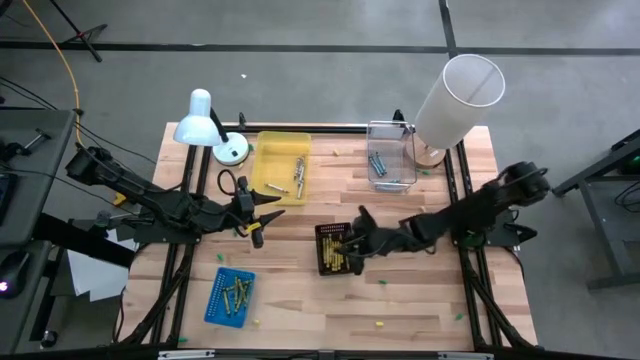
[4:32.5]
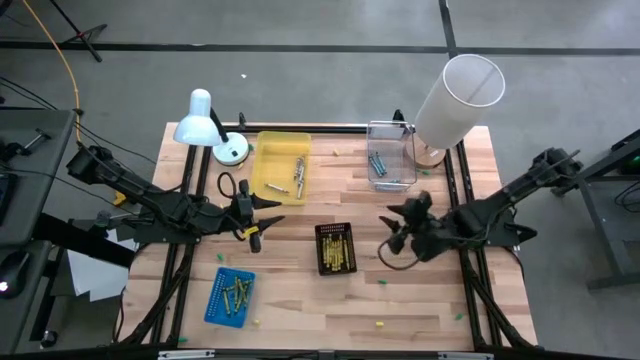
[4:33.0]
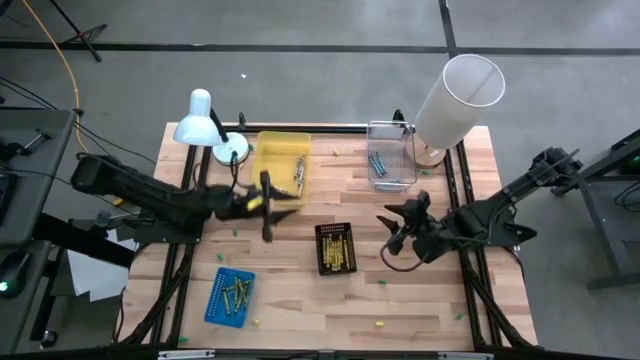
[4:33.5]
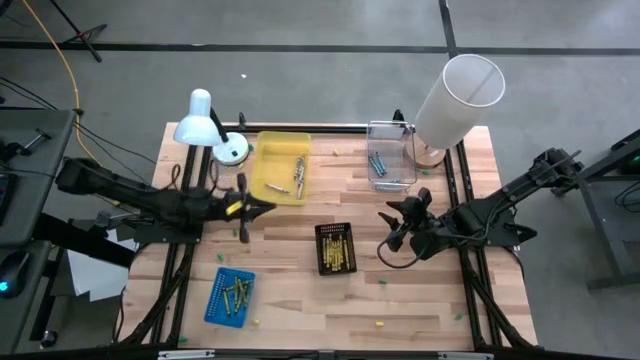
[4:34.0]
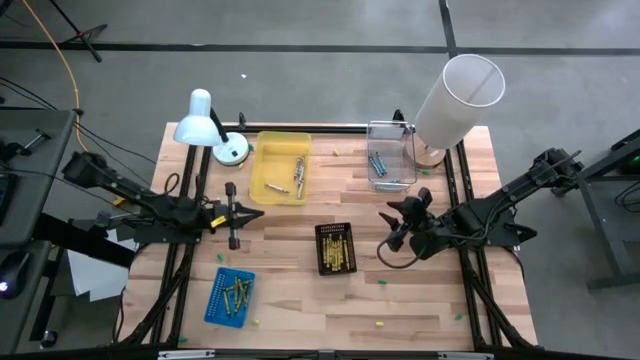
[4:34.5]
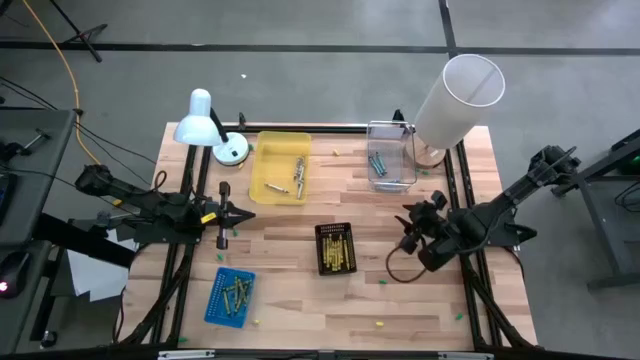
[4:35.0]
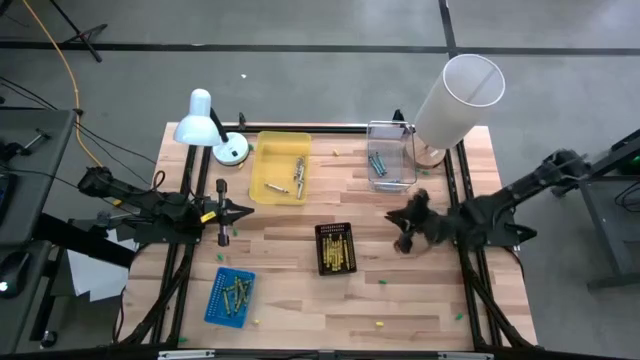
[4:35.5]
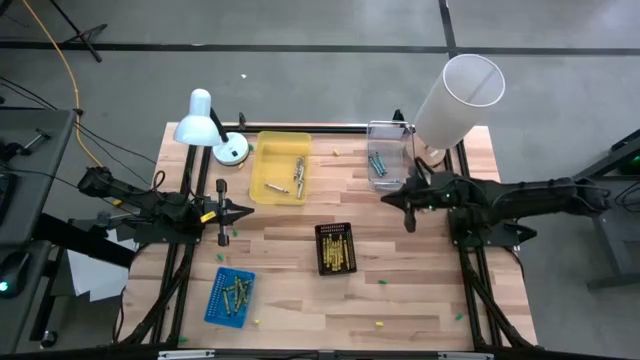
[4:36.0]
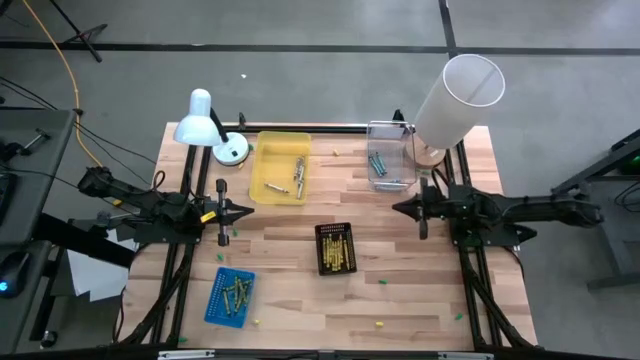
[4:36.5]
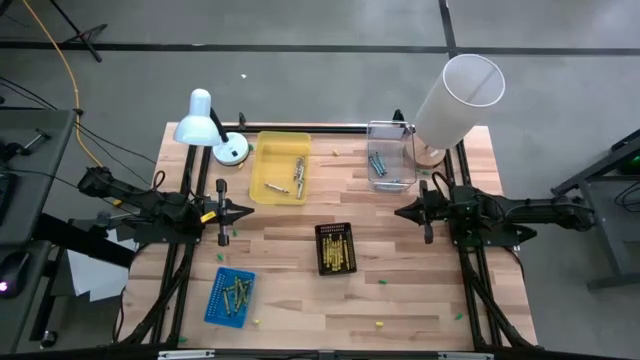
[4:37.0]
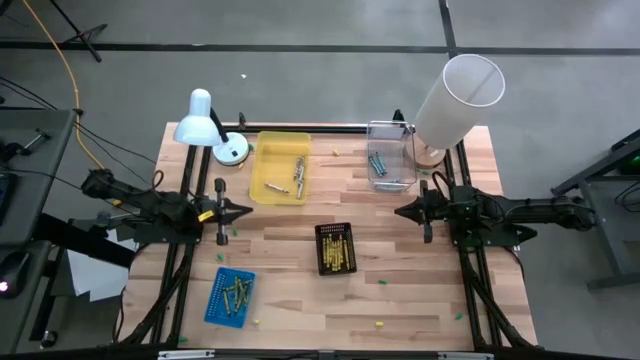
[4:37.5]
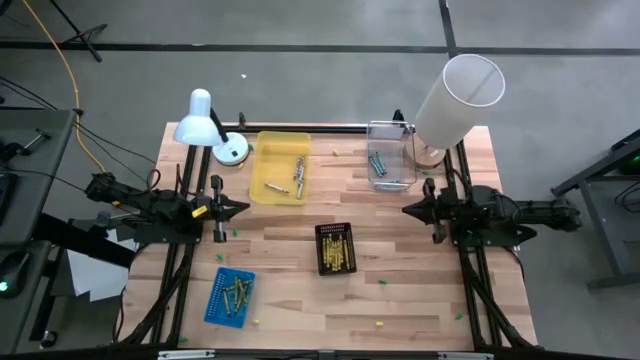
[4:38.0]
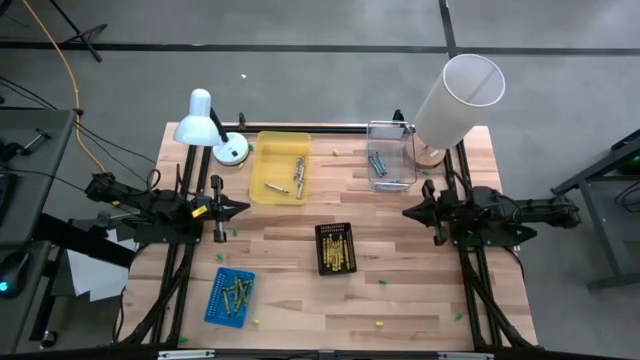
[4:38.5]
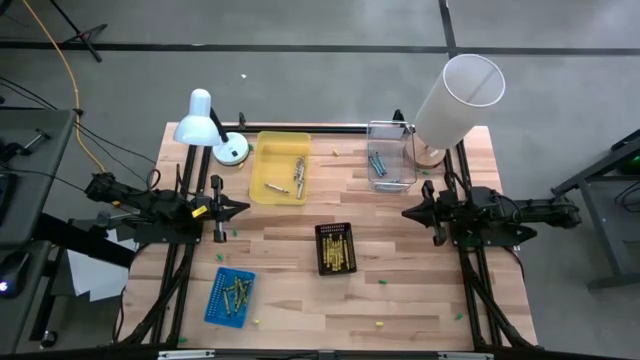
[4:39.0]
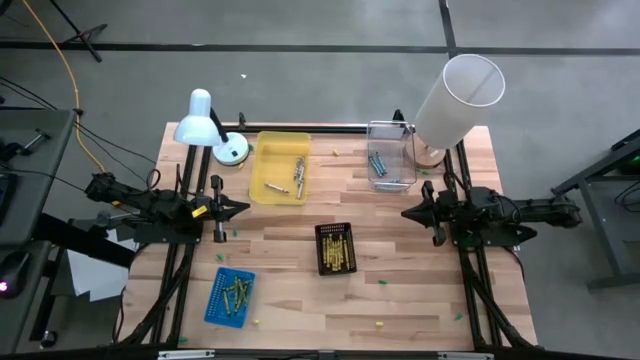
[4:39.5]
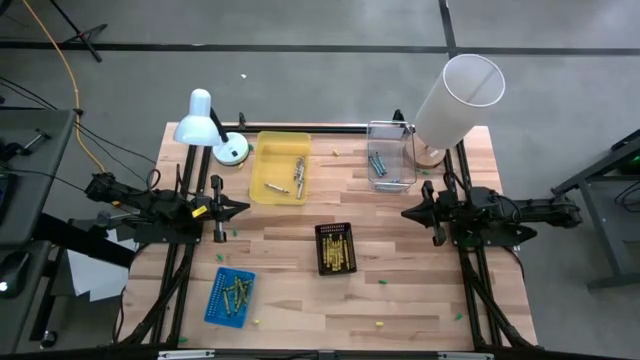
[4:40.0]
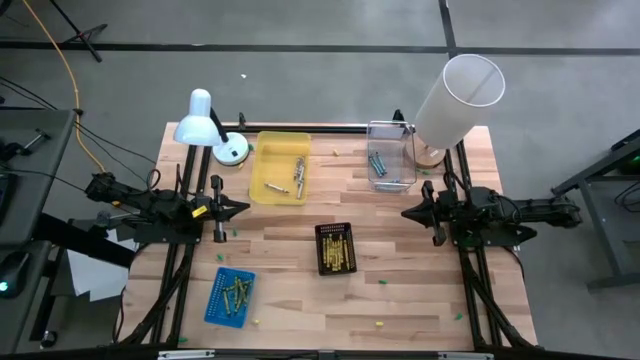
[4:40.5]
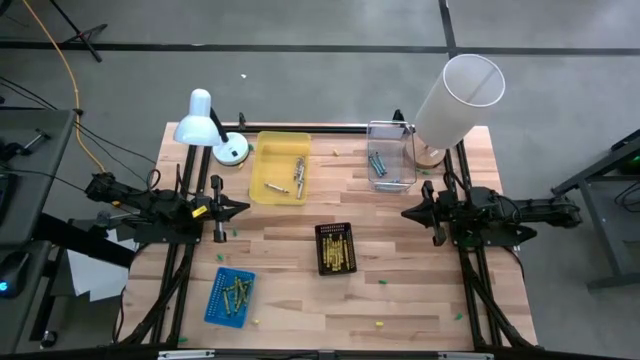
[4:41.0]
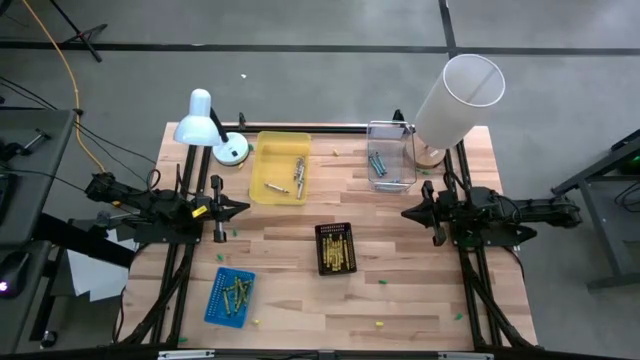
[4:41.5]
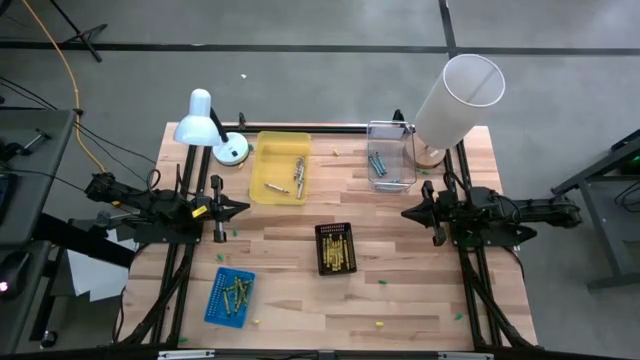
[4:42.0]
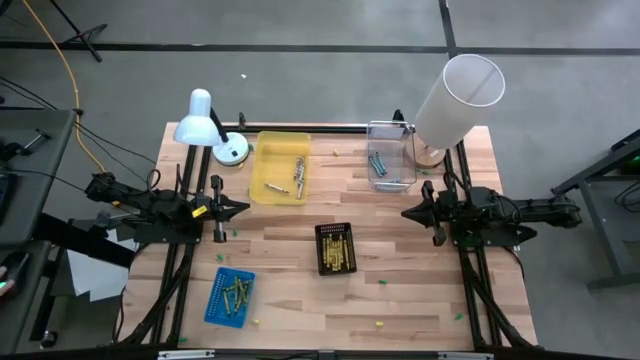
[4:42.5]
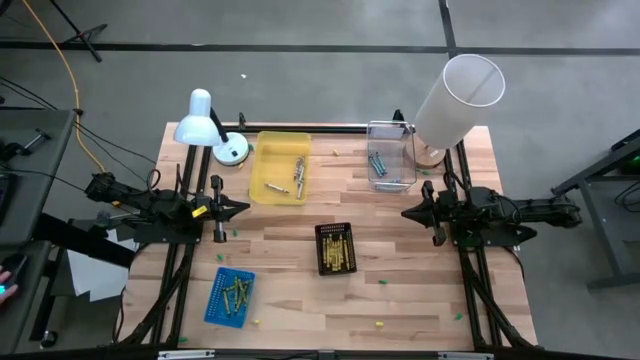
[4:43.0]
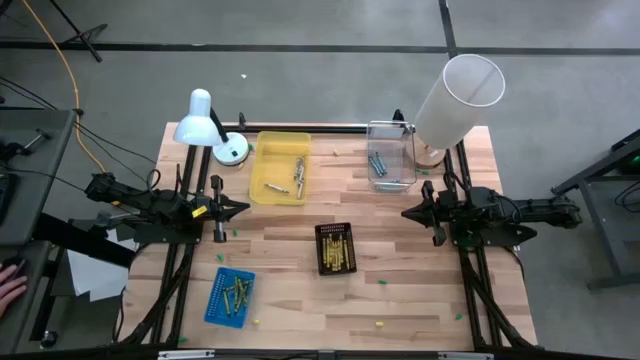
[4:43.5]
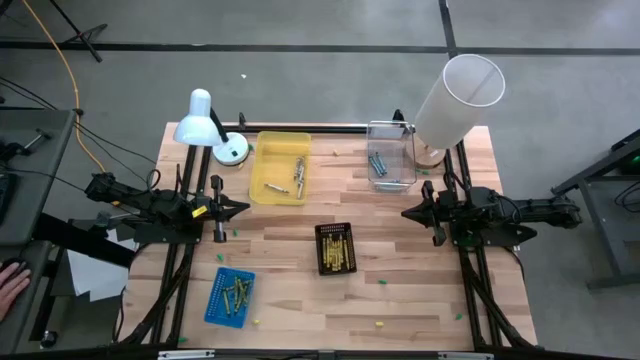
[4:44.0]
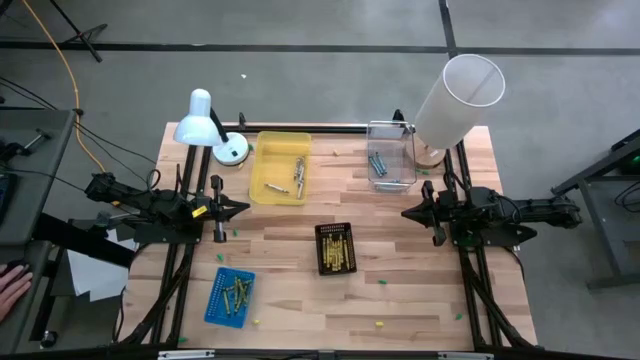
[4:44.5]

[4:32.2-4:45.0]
Task: Sort crayons
Return to Home Position

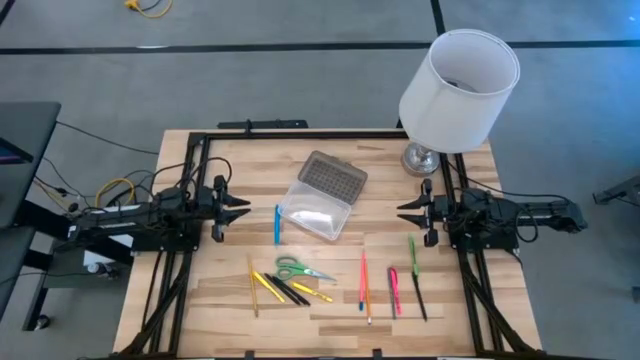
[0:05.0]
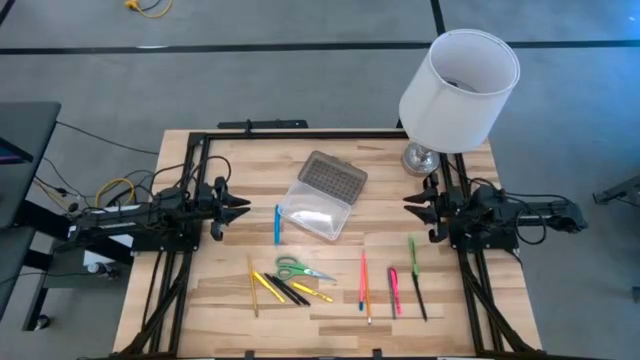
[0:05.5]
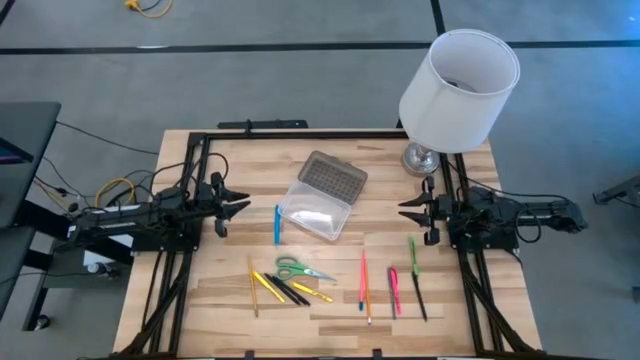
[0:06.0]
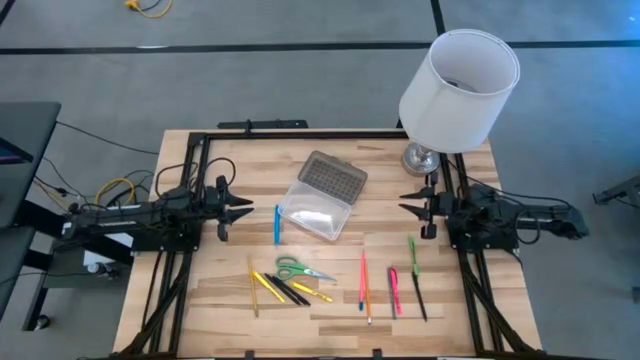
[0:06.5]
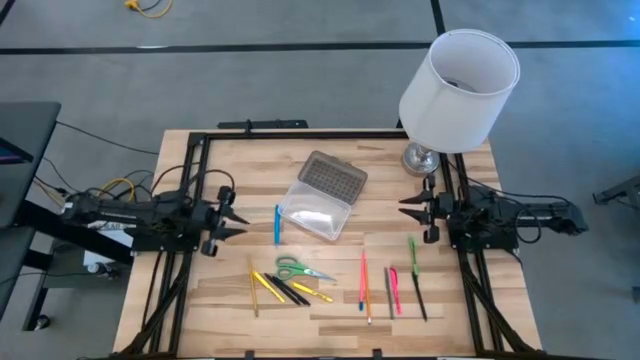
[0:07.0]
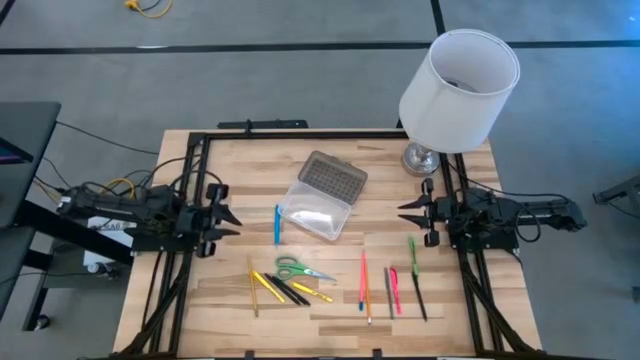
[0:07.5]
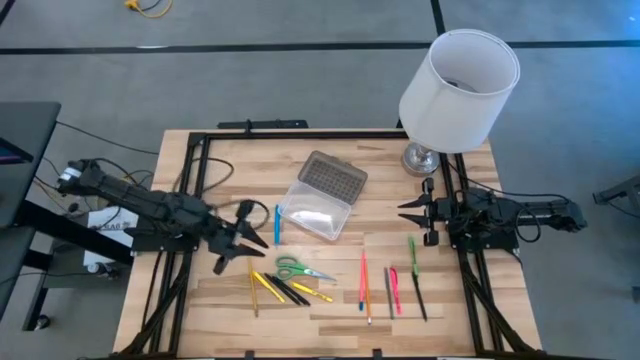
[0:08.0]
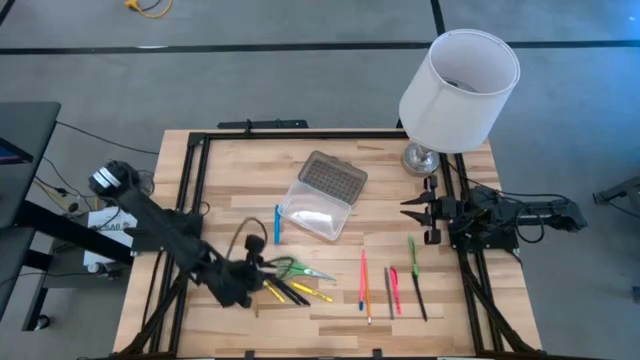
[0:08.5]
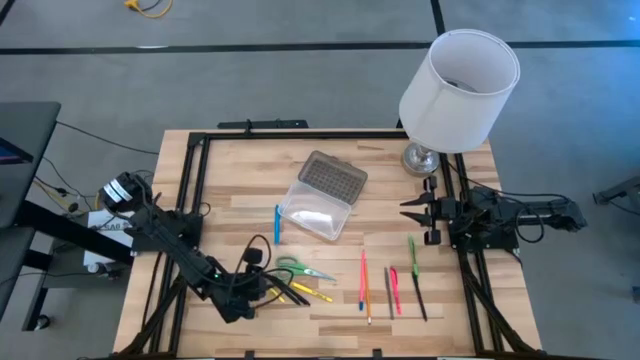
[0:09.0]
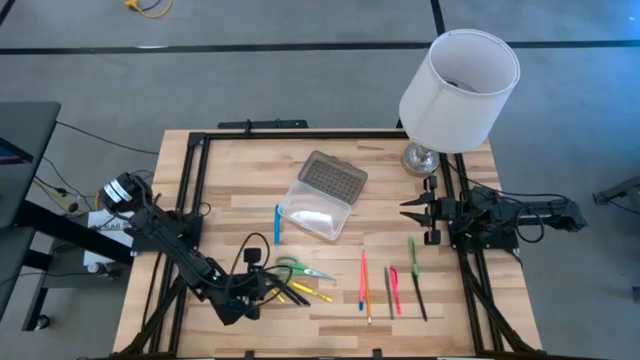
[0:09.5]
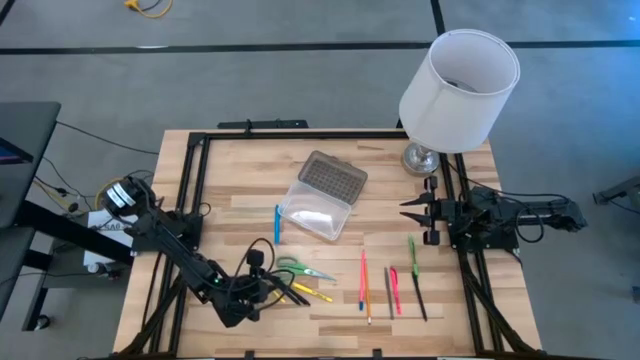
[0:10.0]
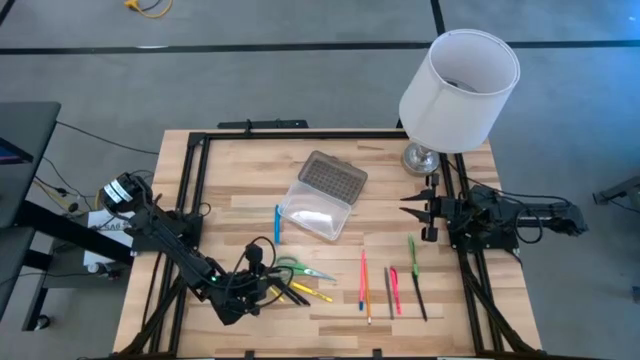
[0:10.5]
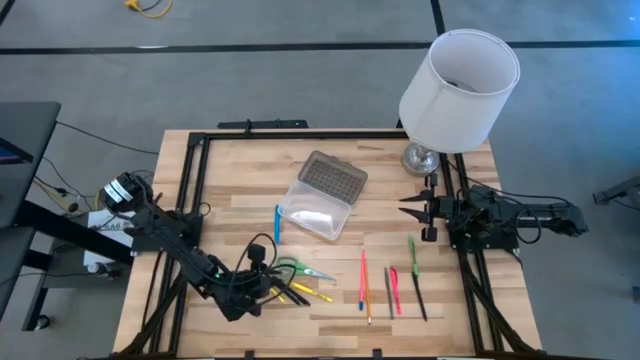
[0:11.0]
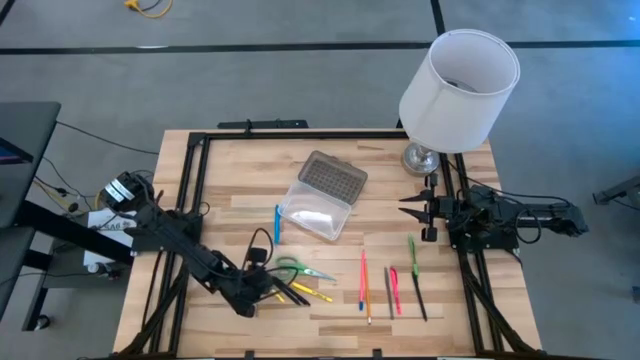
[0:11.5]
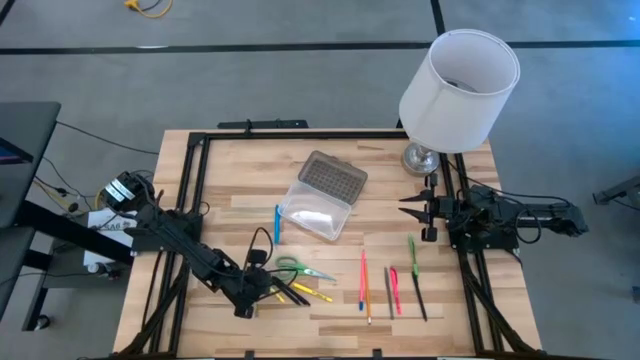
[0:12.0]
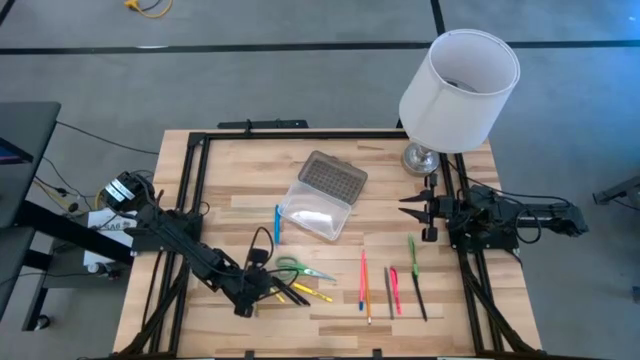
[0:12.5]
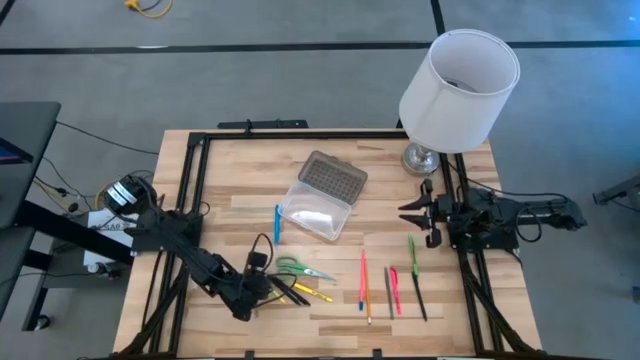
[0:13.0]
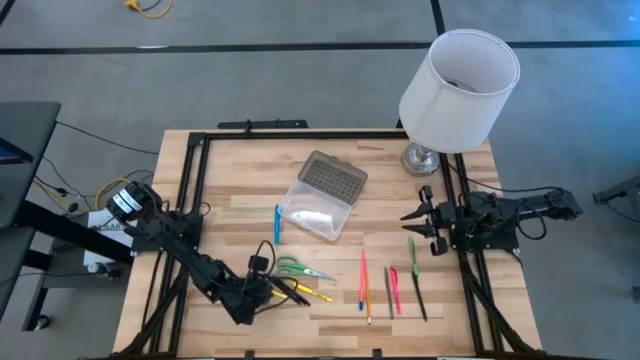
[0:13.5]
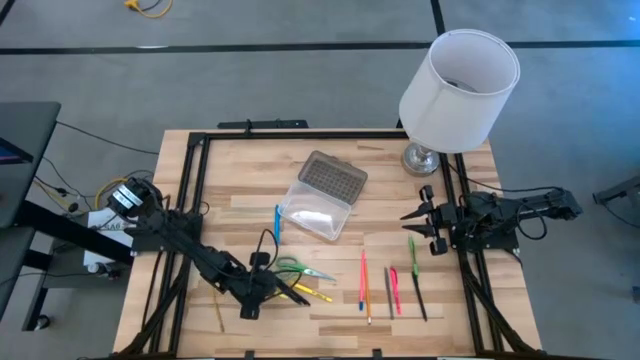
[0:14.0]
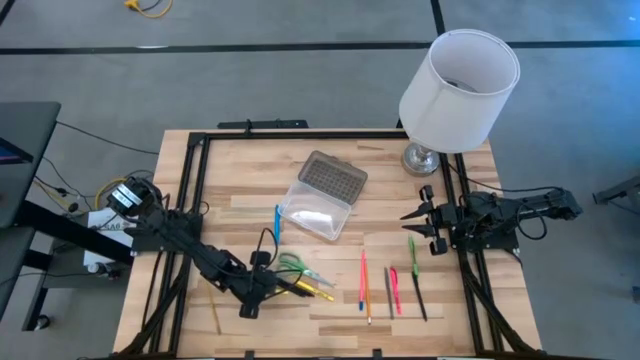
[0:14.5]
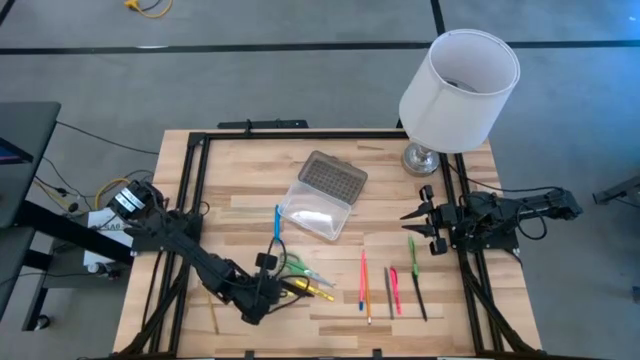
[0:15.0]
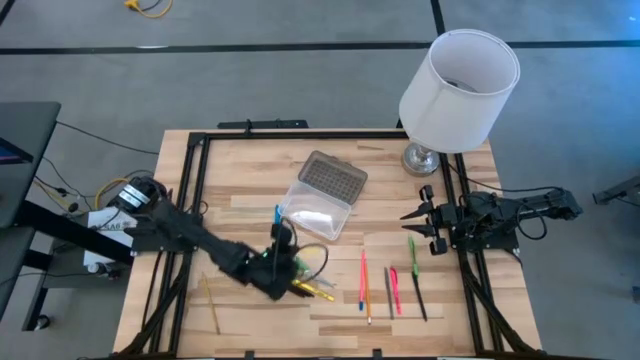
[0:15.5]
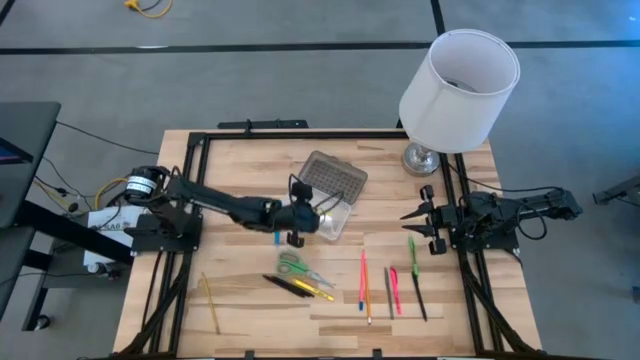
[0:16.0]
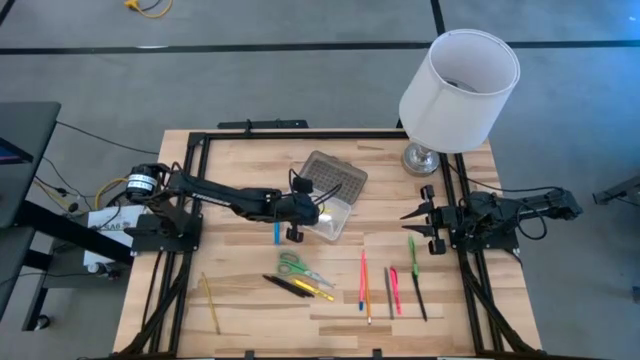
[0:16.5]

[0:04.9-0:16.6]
Task: Pick & place school supplies into a supply box
Put the left yellow pen into the gray supply box
